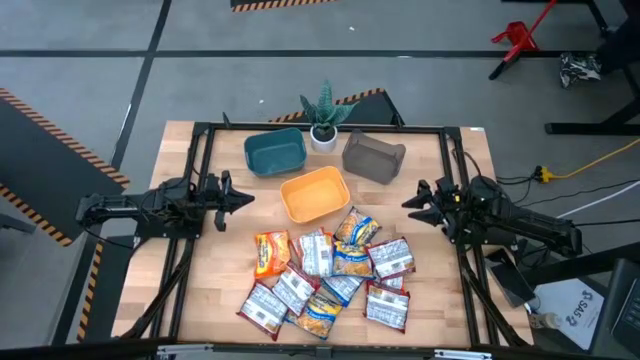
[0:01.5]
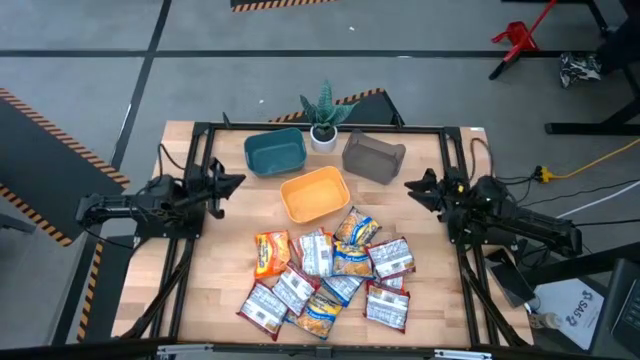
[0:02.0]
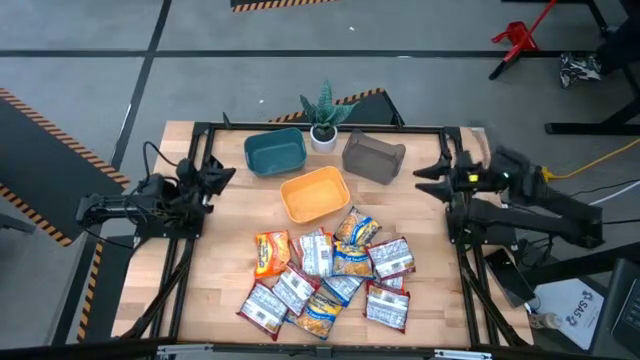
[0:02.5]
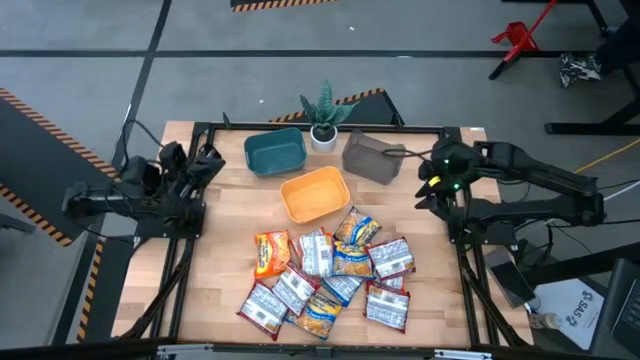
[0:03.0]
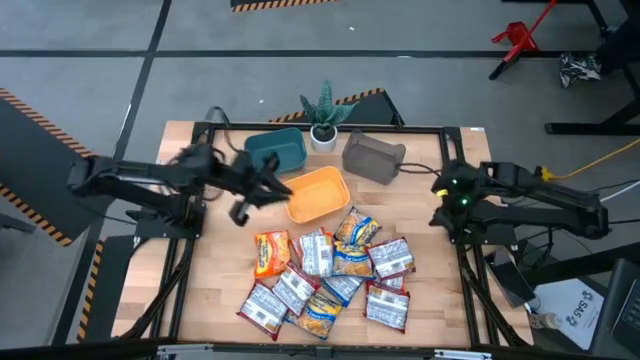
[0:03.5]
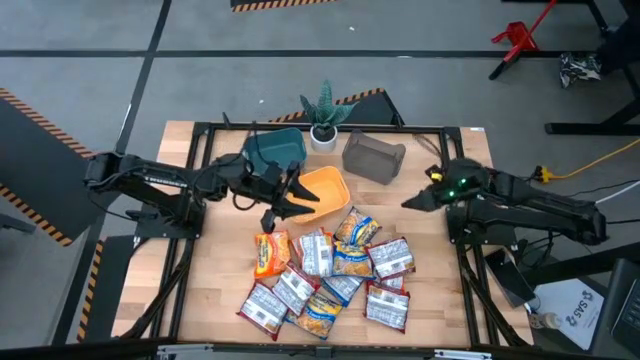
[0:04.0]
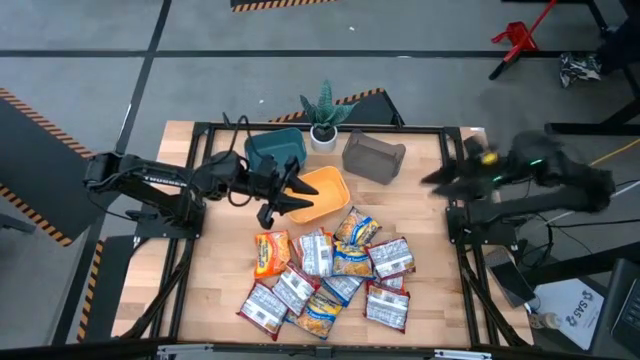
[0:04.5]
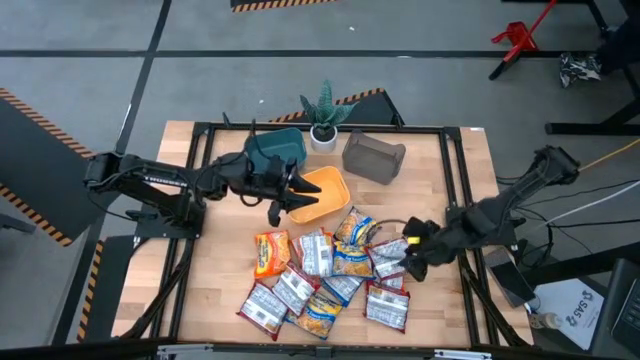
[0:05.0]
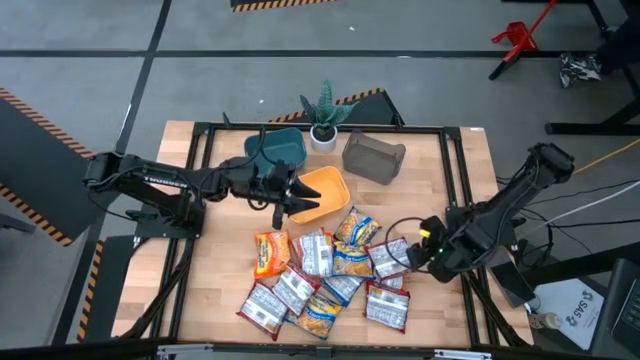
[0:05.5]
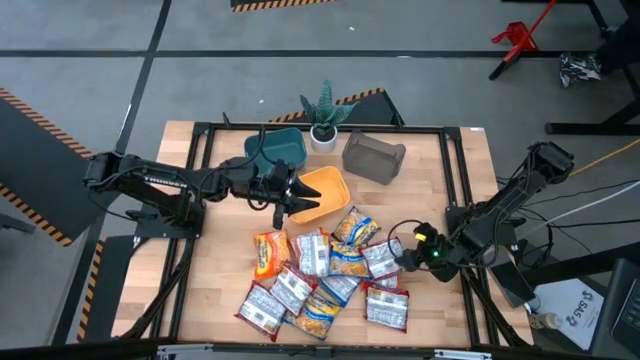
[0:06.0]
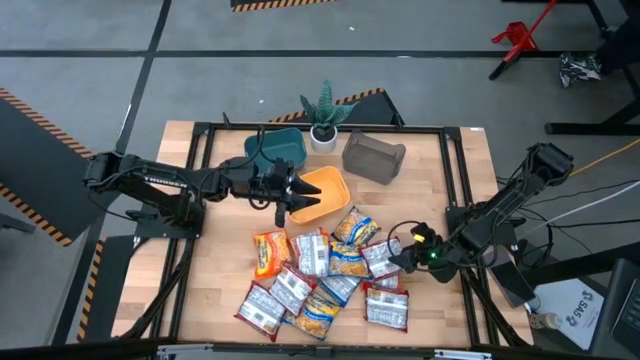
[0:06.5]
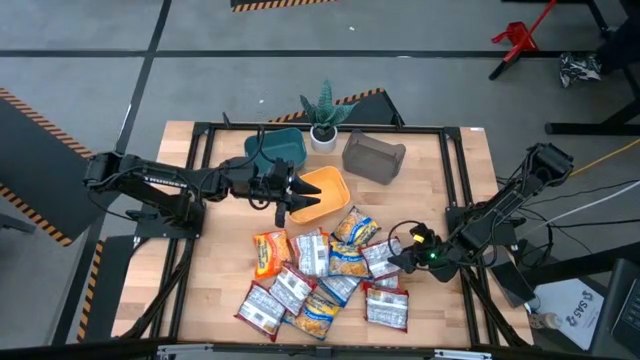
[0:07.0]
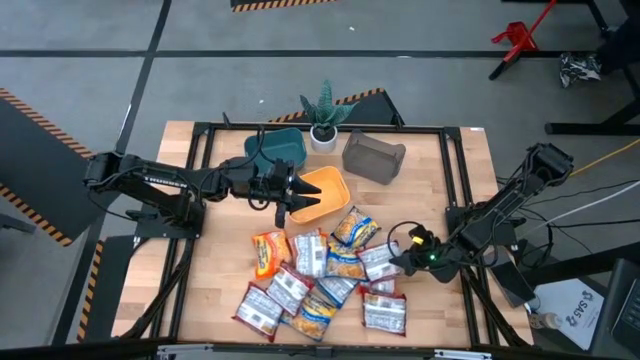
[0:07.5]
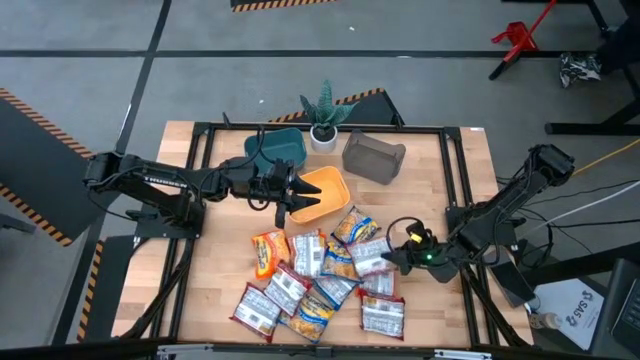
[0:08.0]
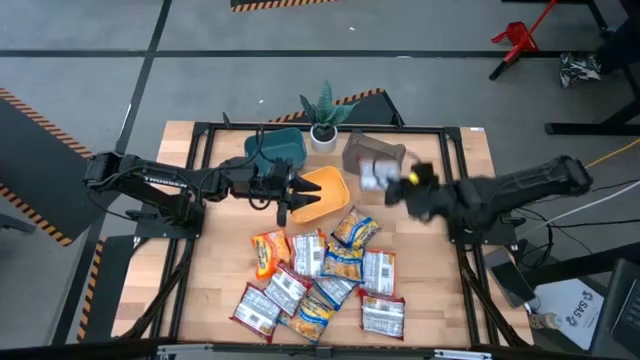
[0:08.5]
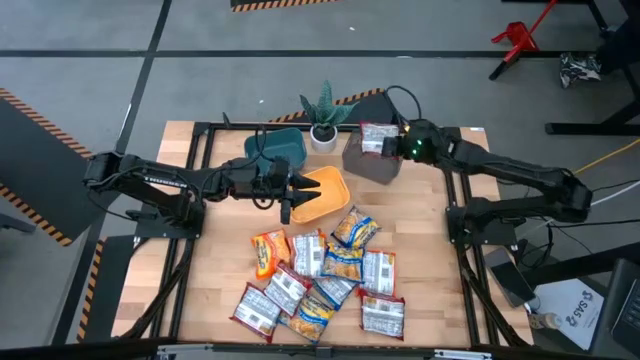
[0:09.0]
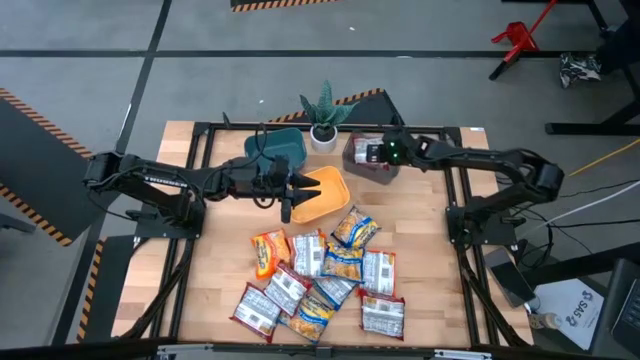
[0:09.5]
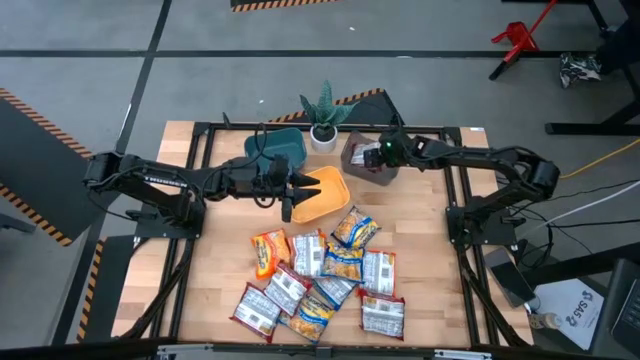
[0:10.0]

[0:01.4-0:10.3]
Task: Sort Maruchan noodles
Put the red noodle pack into the black bin

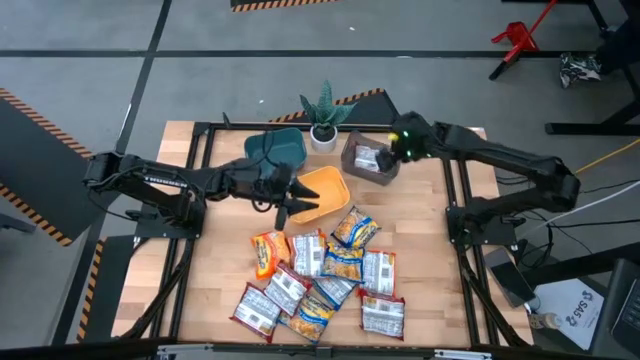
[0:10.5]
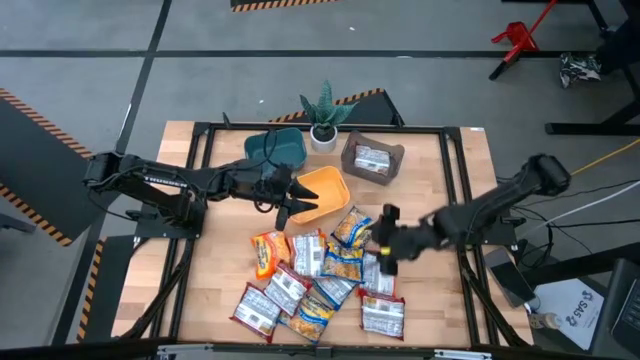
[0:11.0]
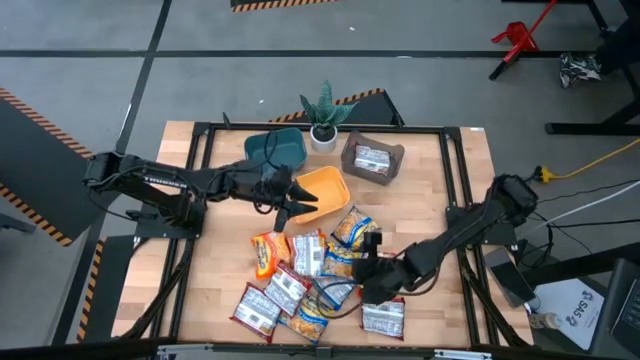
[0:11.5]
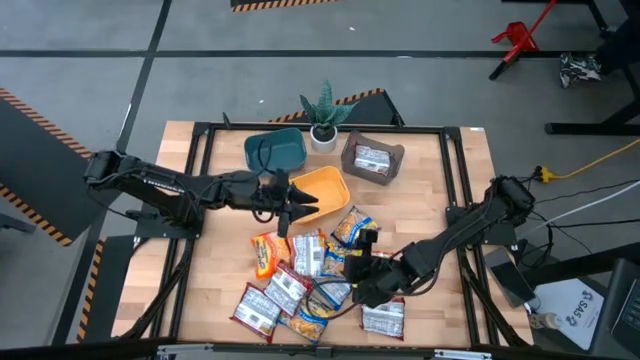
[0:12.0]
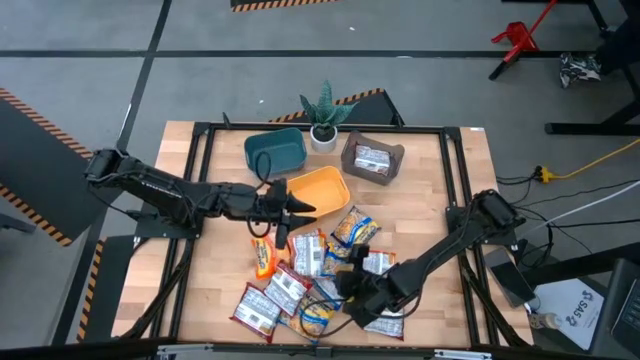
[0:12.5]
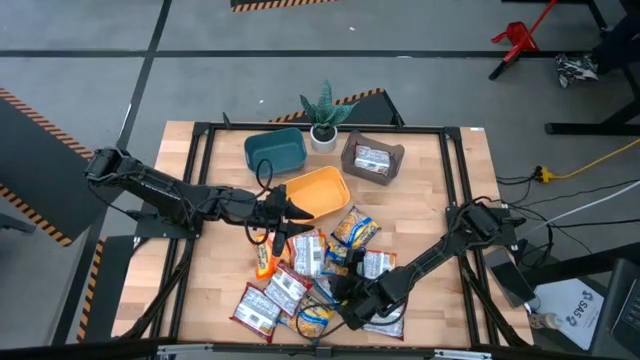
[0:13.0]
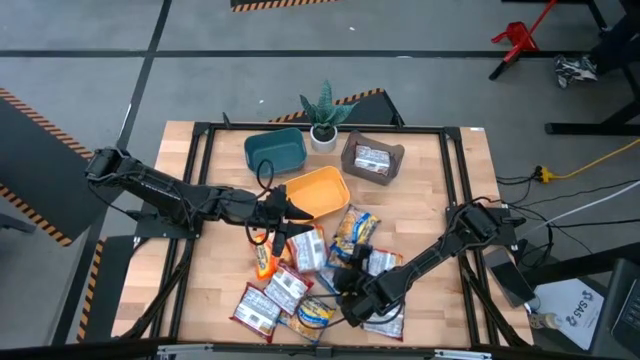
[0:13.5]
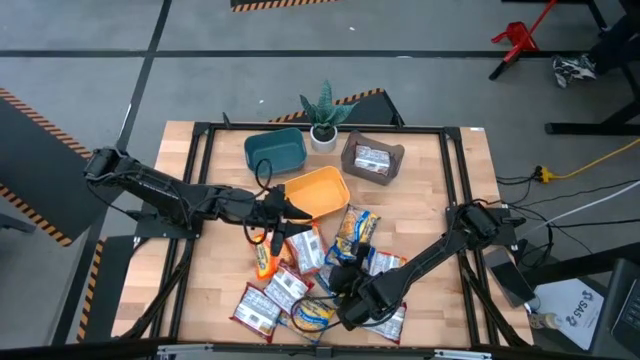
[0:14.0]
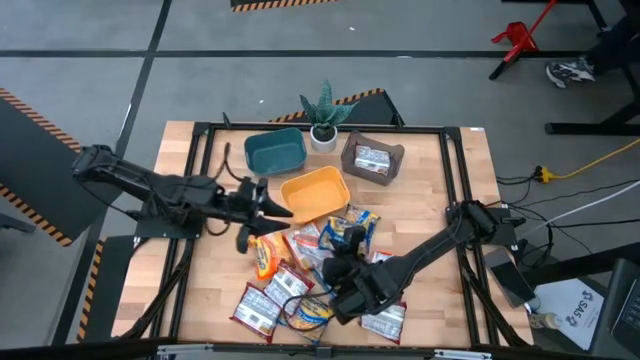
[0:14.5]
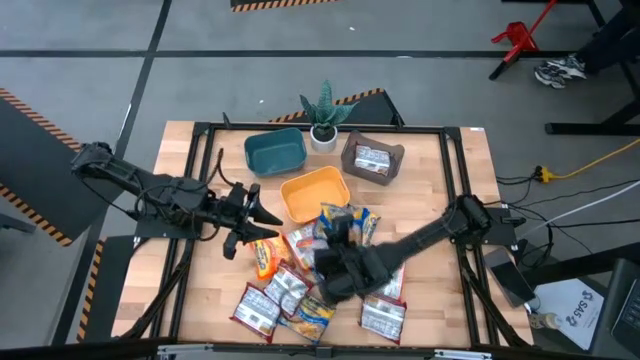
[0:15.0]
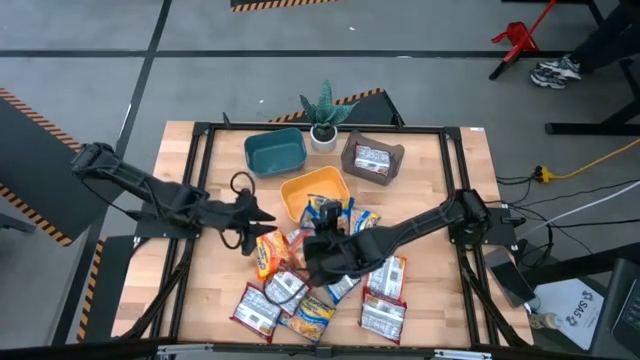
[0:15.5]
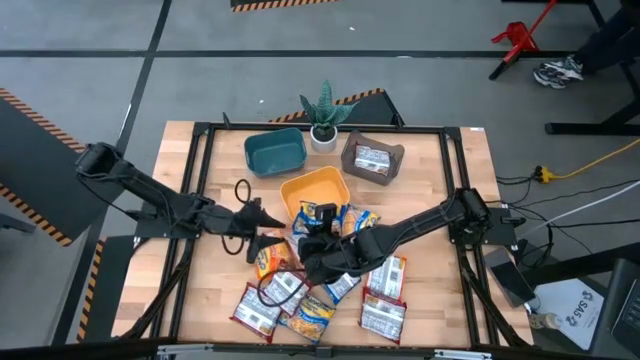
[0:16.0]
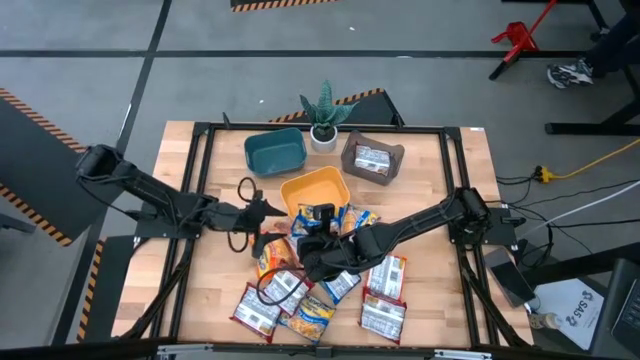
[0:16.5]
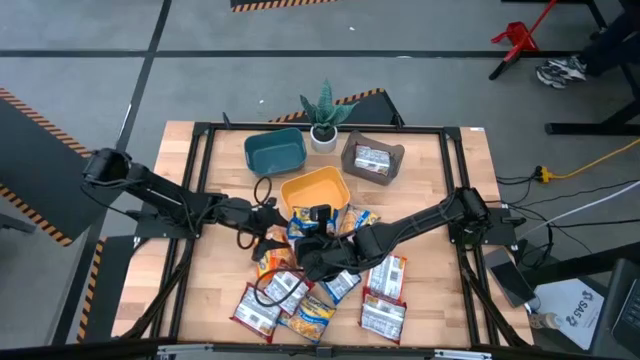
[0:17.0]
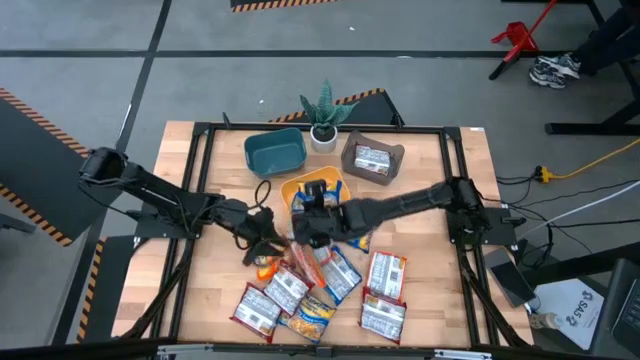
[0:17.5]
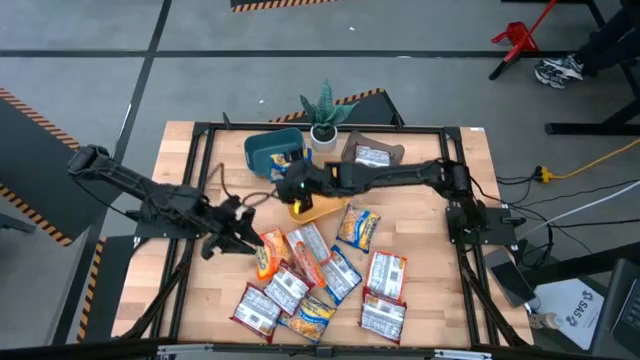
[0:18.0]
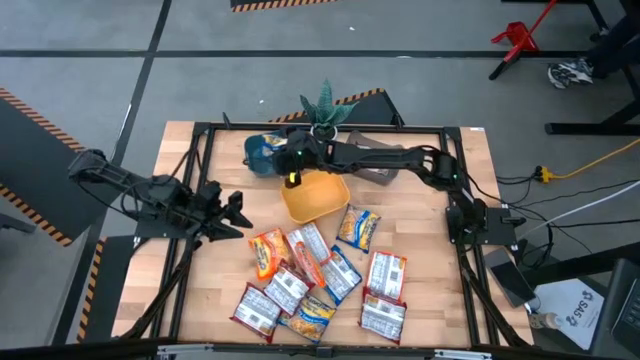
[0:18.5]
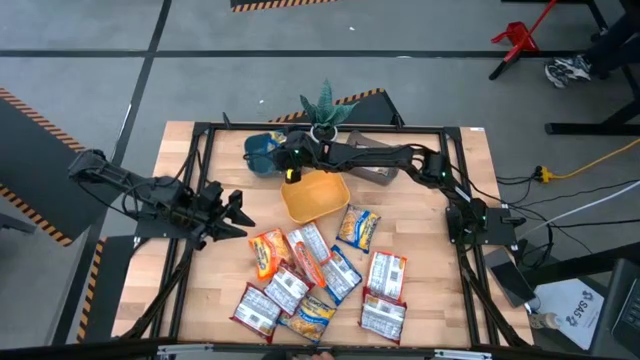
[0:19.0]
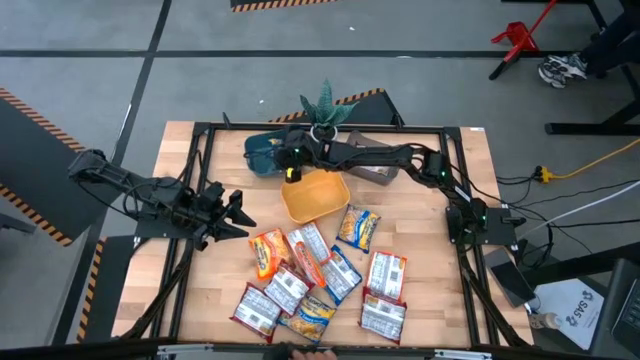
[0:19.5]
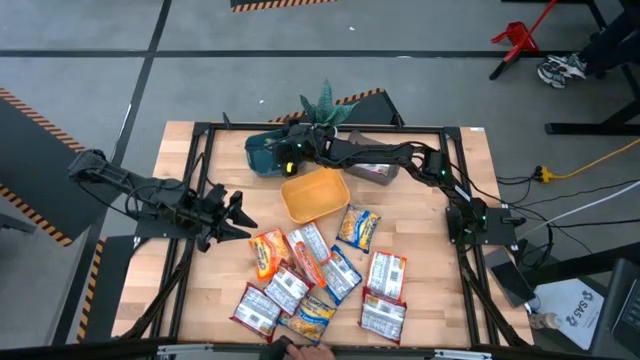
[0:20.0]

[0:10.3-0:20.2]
Put the blue noodle pack into the blue bin
